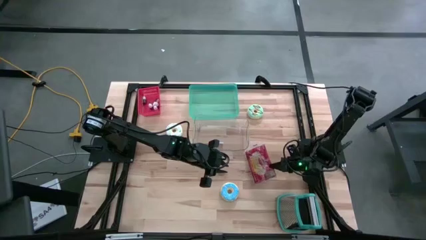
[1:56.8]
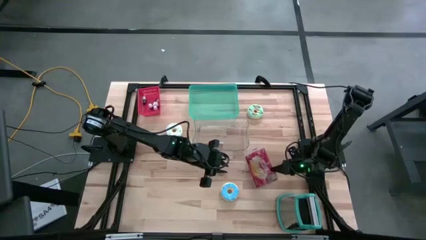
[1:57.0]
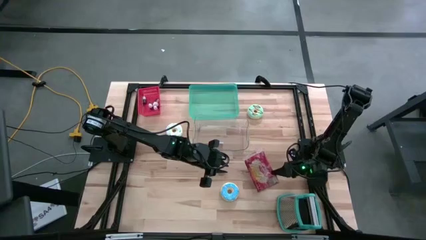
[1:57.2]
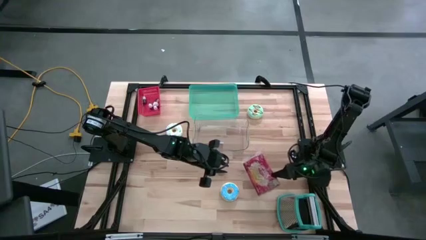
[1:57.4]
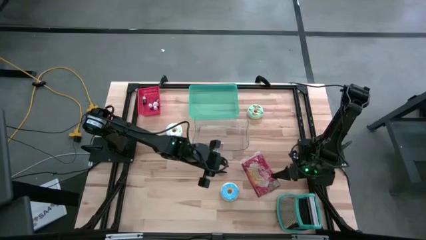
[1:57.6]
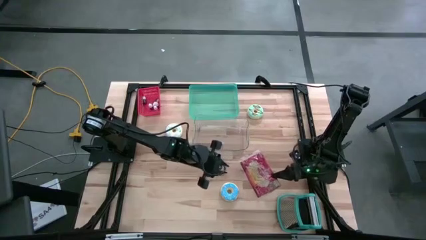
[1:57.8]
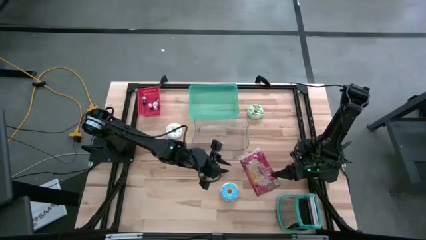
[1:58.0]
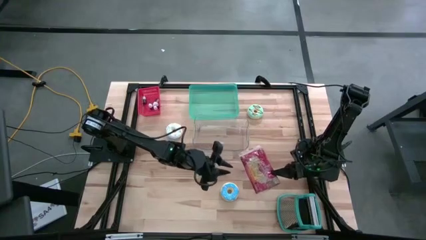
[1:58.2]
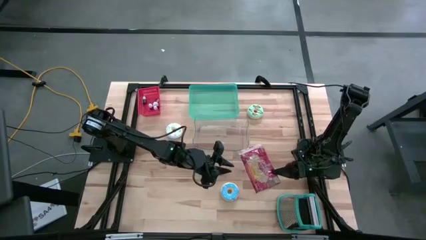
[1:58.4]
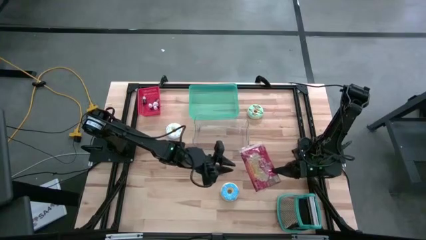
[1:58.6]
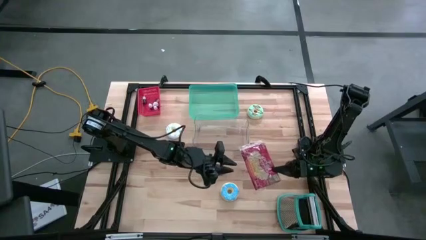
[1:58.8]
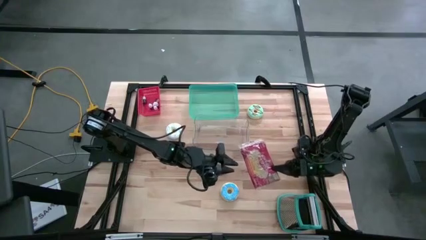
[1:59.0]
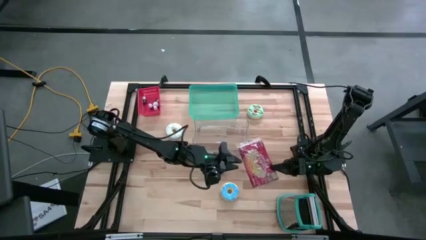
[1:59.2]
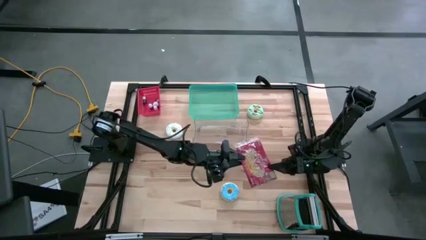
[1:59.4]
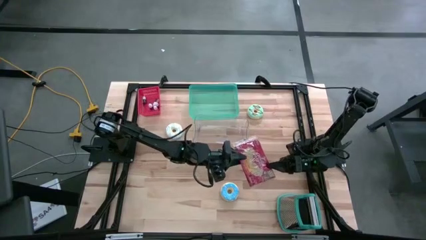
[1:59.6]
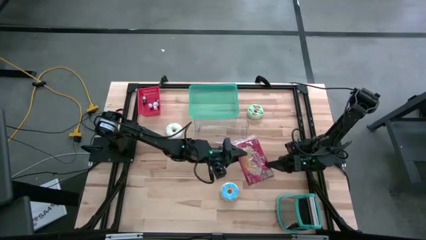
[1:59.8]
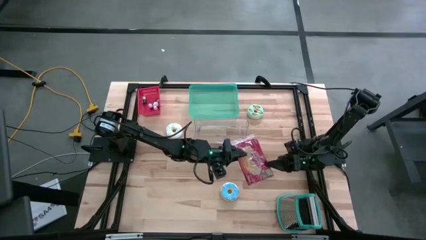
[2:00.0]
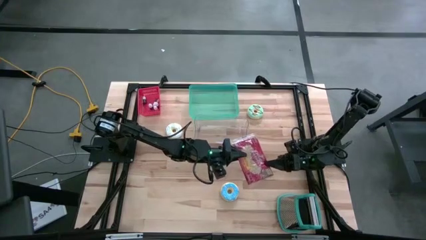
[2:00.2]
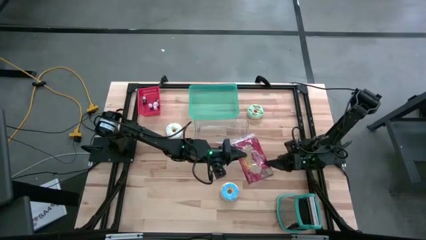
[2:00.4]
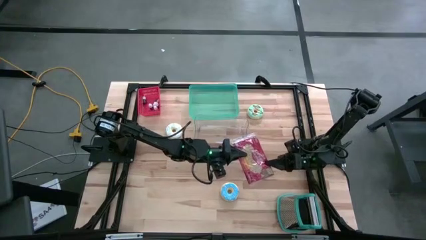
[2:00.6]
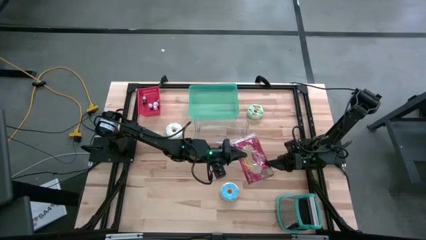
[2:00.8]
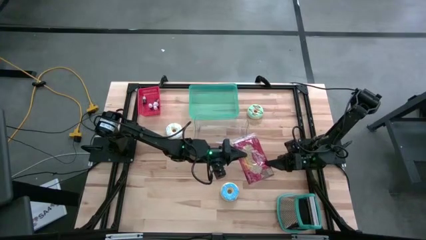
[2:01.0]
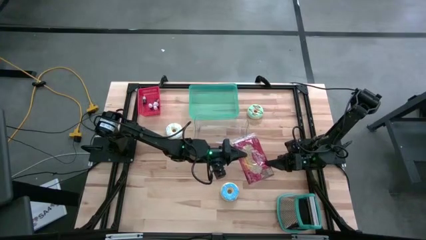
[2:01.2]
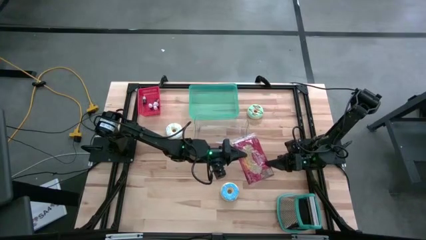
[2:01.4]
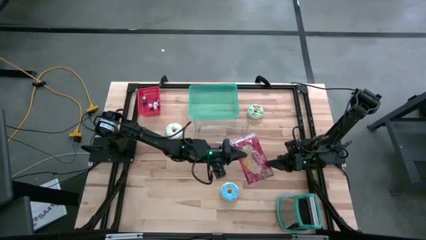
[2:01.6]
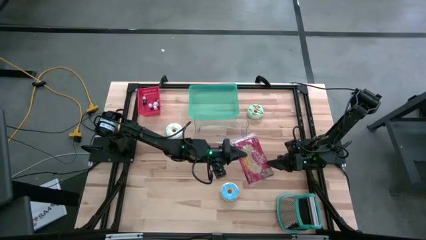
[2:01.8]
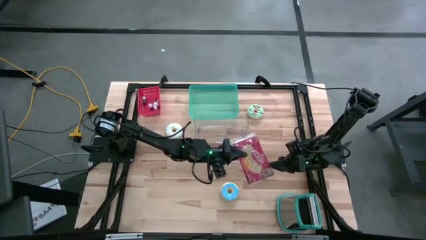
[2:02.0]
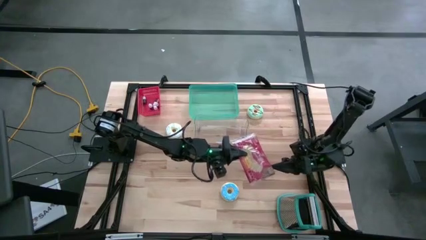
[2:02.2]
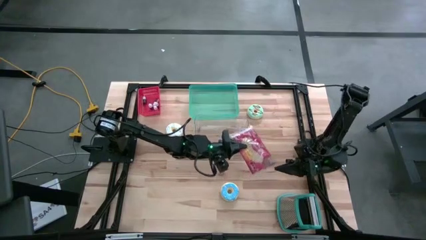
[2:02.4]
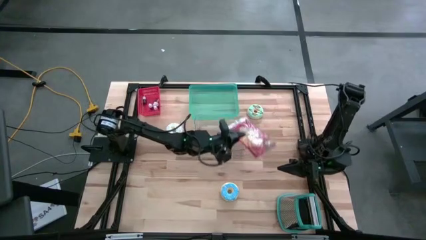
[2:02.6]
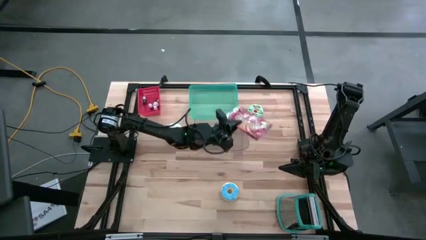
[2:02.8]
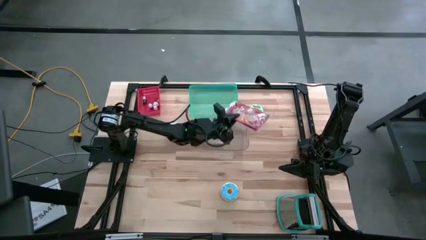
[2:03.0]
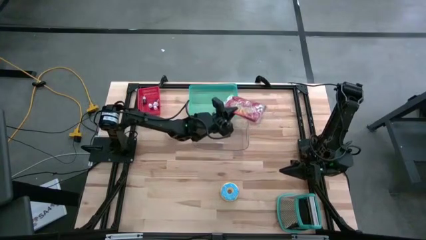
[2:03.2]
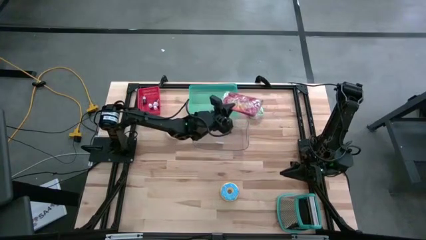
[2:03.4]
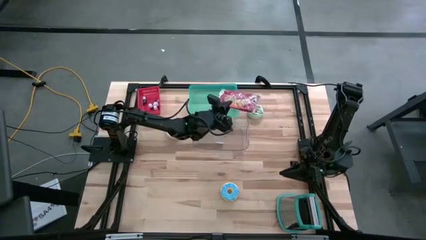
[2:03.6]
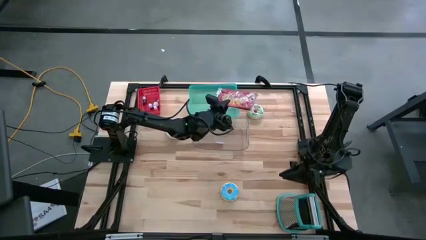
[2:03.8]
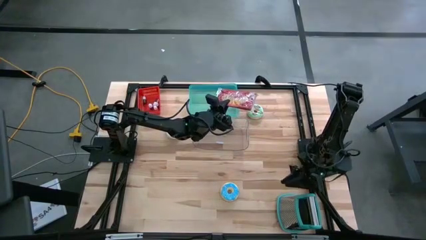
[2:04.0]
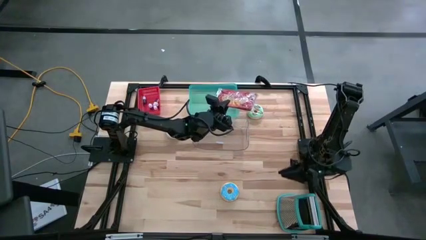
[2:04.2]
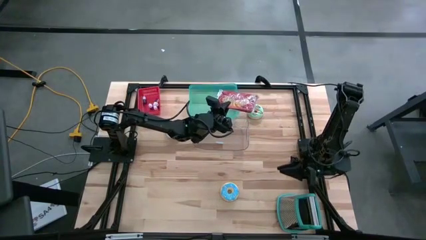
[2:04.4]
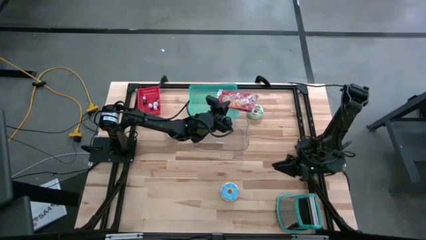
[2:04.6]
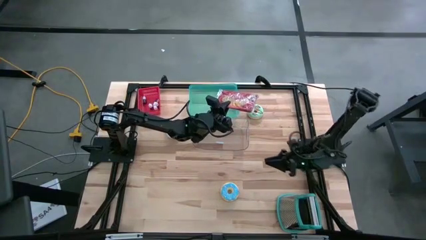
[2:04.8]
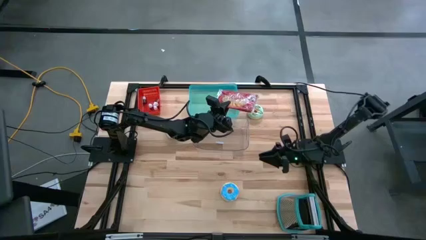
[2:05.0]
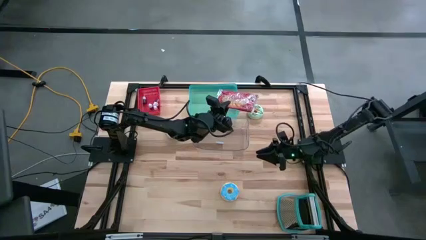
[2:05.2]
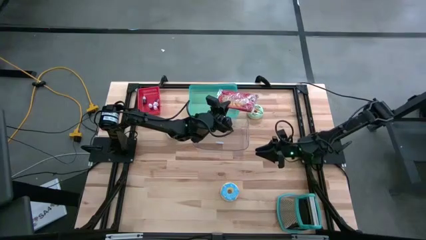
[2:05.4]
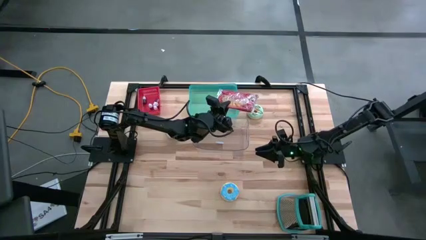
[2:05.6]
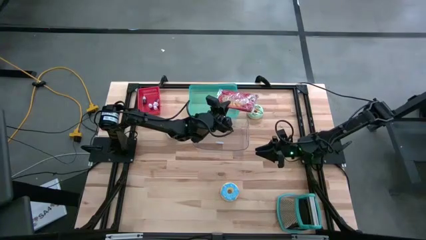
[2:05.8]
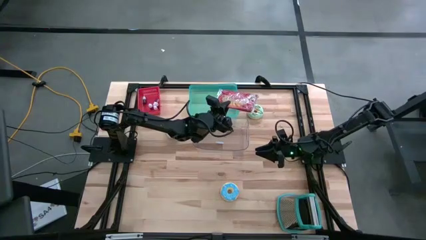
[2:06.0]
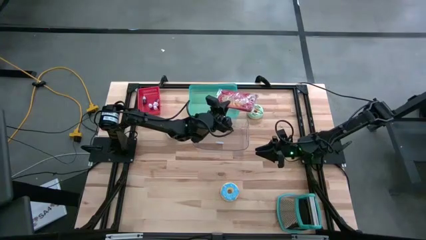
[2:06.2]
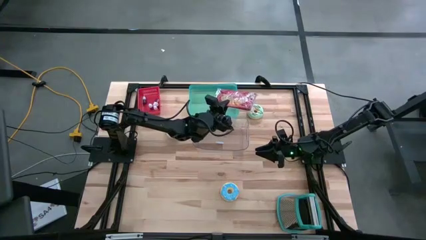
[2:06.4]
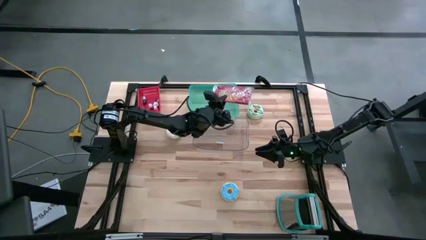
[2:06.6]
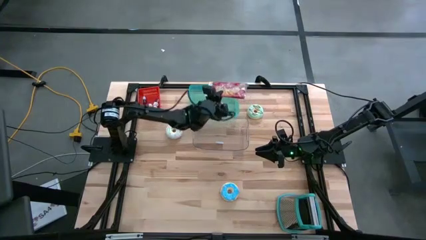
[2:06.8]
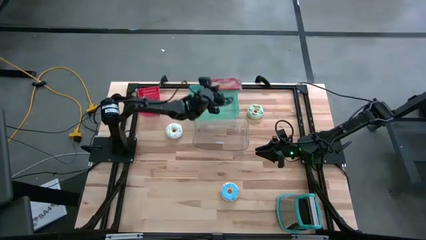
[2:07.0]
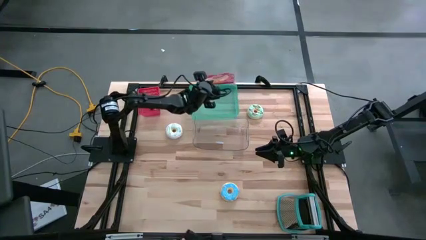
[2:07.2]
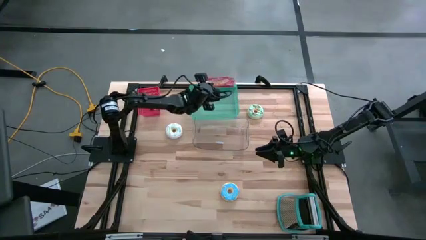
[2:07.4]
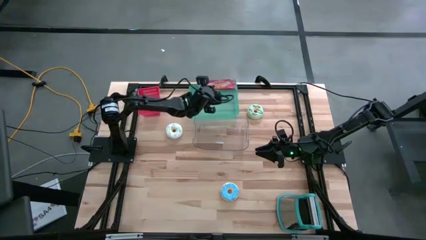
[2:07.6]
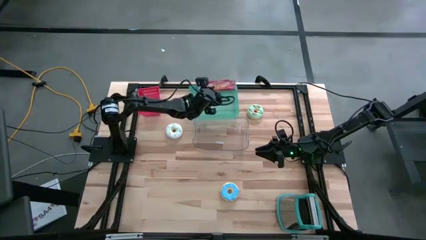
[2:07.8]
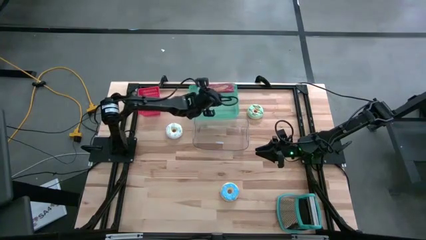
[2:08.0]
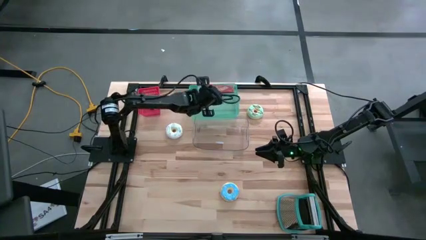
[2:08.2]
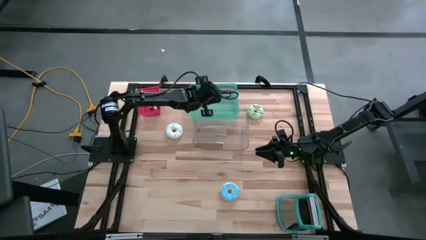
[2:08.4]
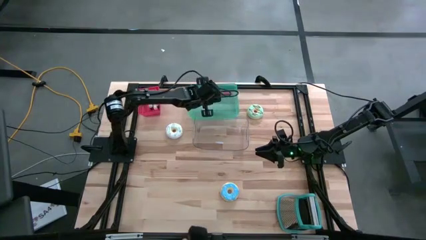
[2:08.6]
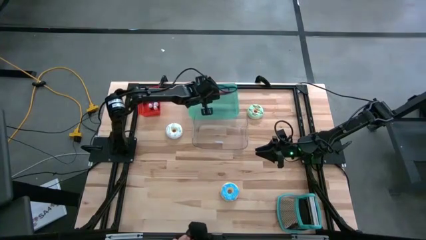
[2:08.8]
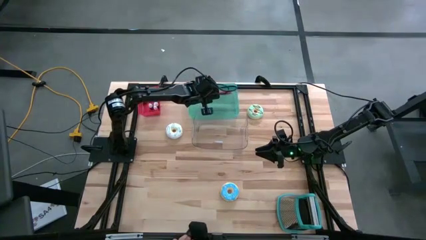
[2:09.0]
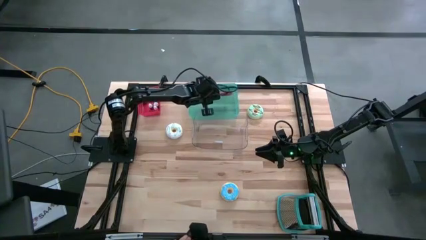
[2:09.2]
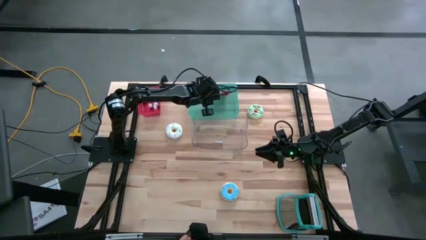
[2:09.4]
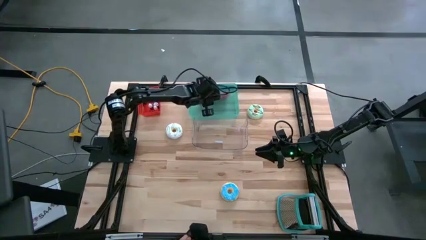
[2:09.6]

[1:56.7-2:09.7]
Put the popcorn bag into the blue bin
